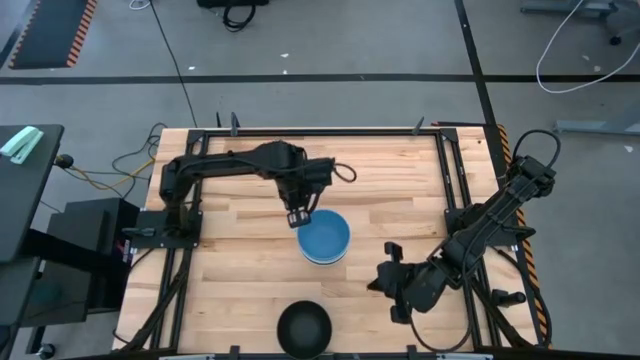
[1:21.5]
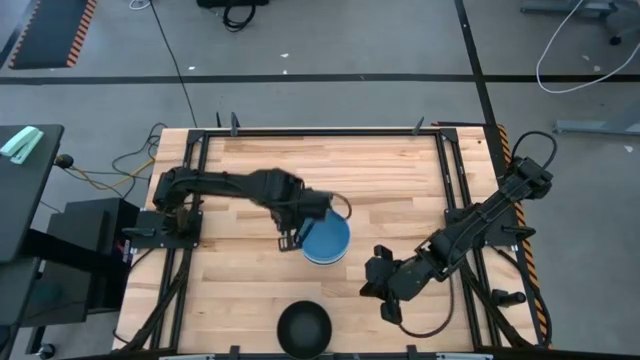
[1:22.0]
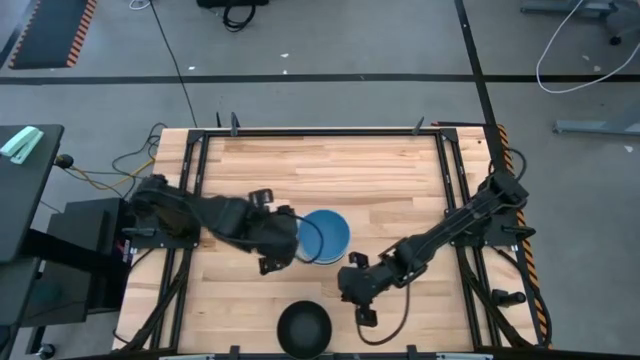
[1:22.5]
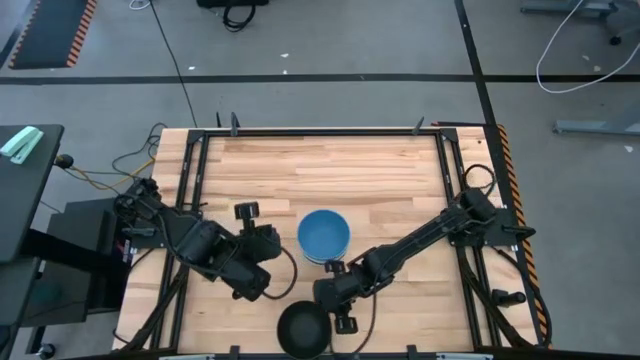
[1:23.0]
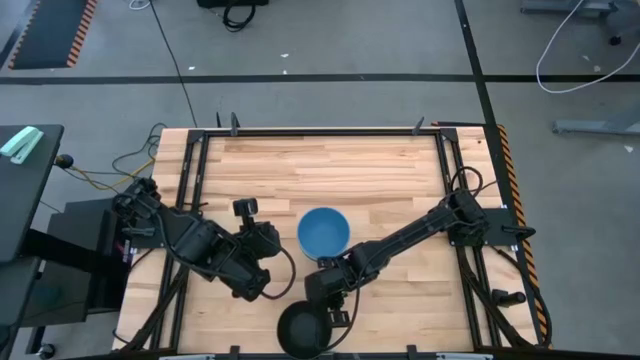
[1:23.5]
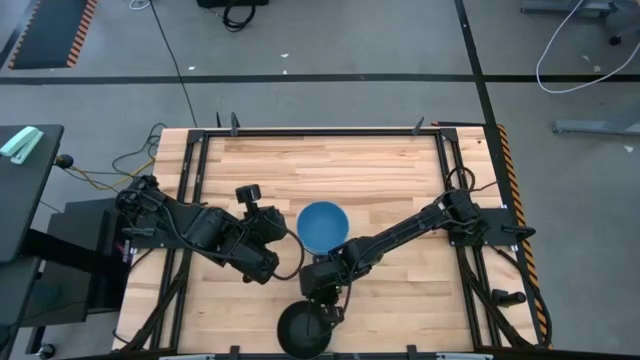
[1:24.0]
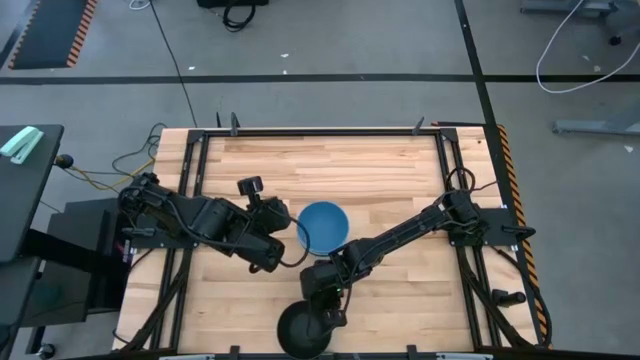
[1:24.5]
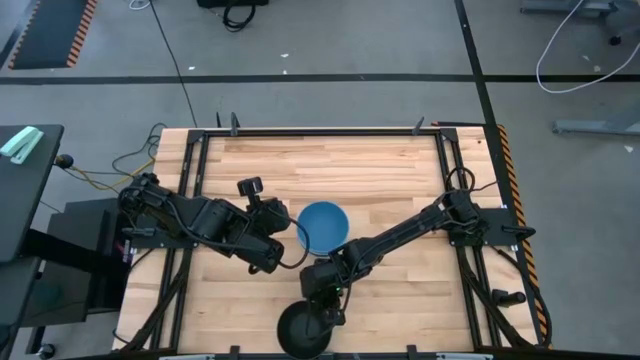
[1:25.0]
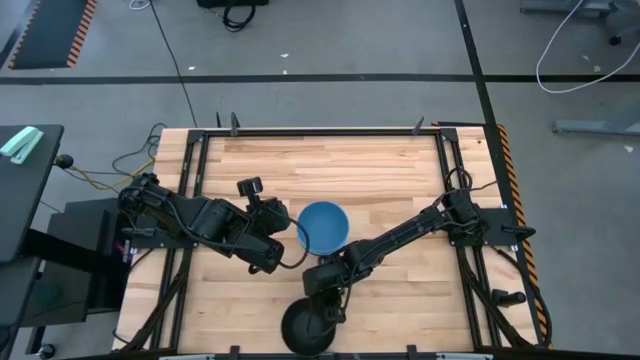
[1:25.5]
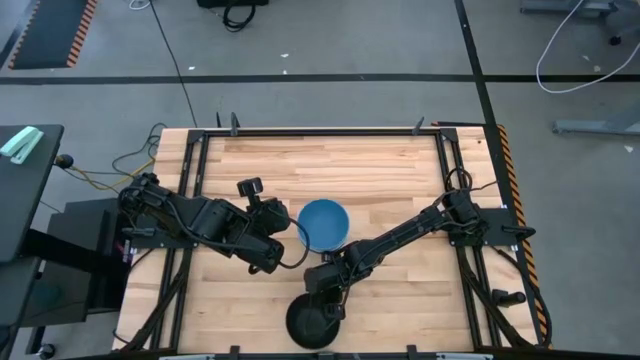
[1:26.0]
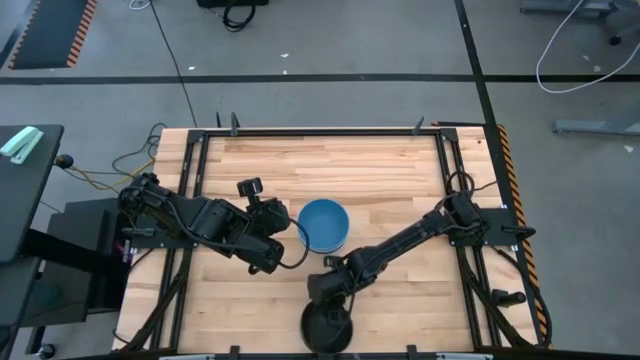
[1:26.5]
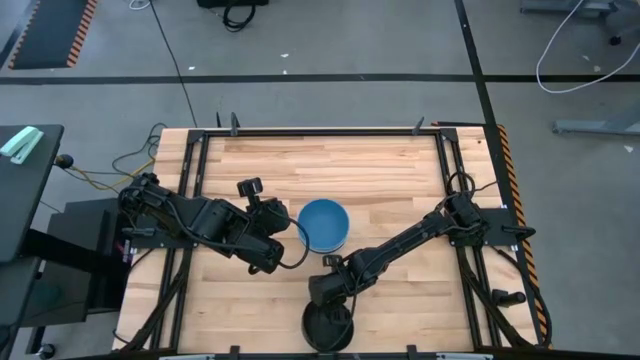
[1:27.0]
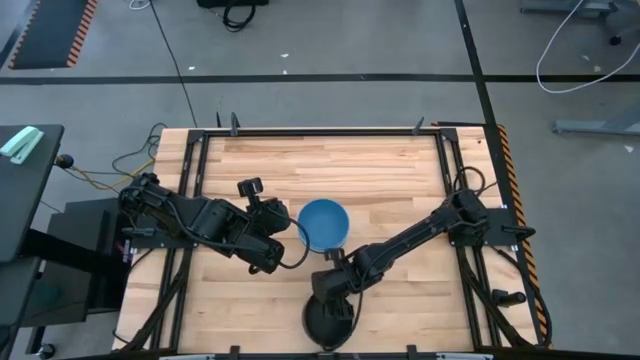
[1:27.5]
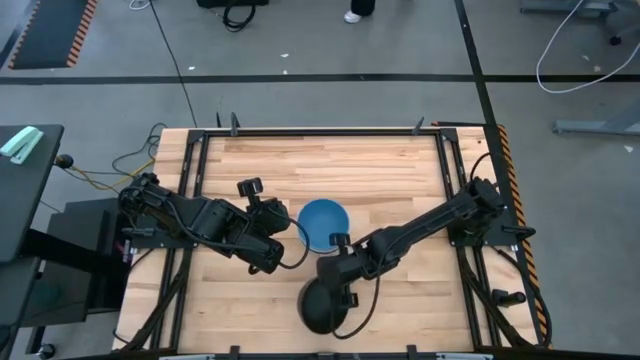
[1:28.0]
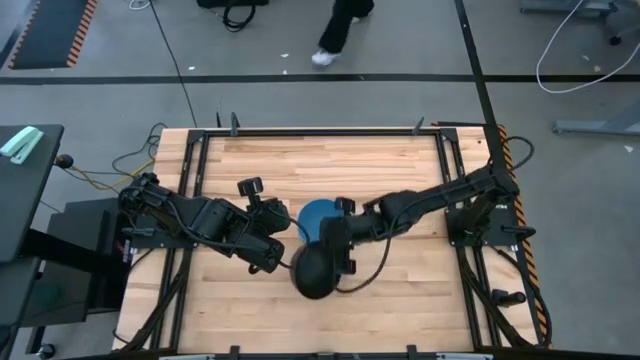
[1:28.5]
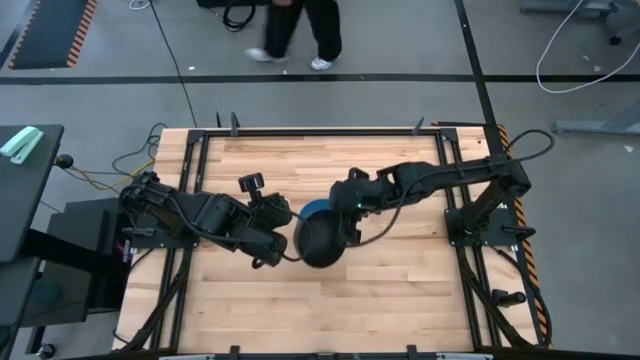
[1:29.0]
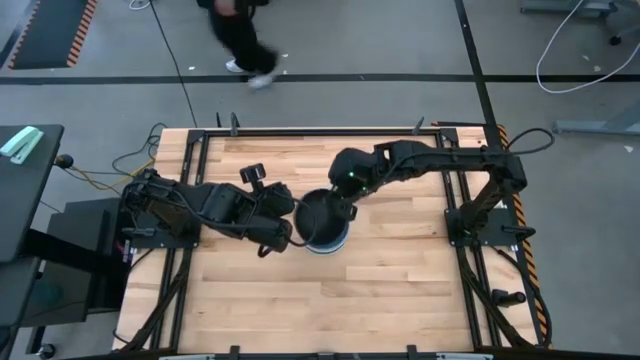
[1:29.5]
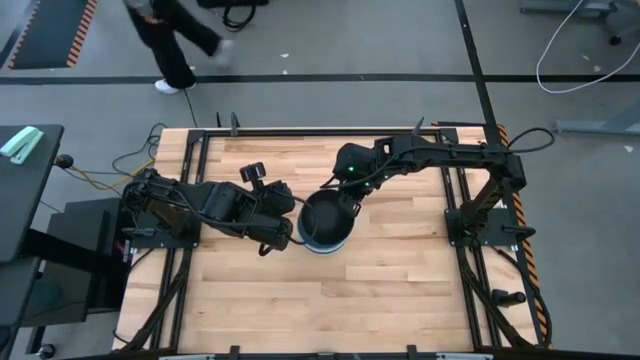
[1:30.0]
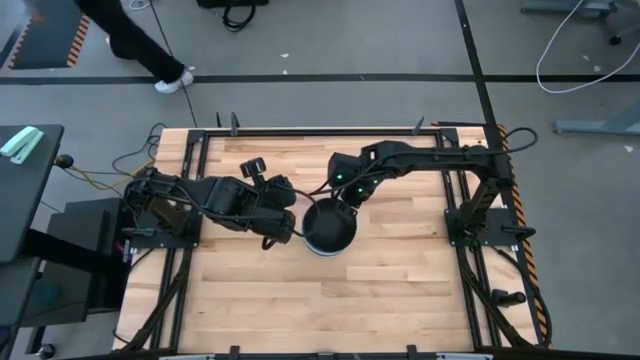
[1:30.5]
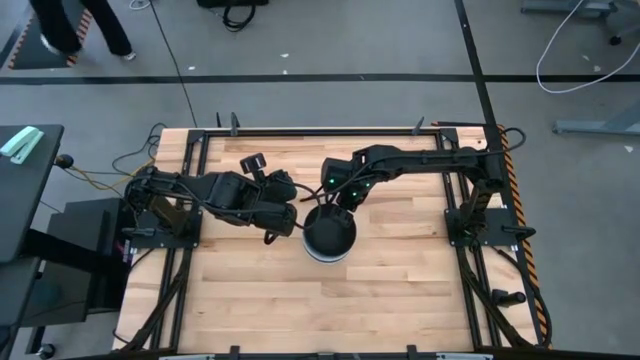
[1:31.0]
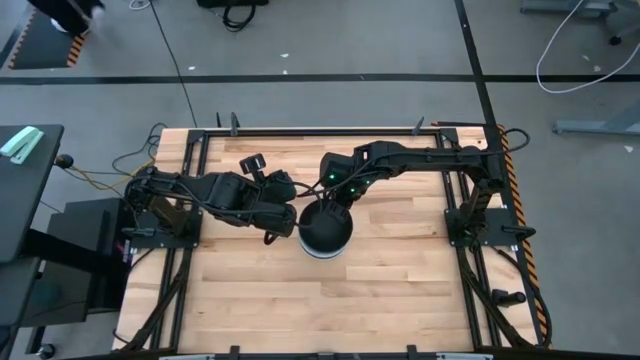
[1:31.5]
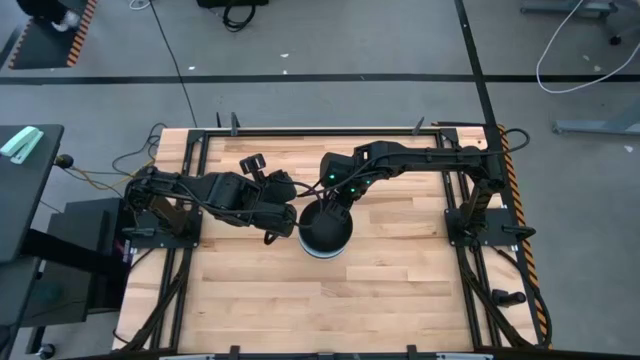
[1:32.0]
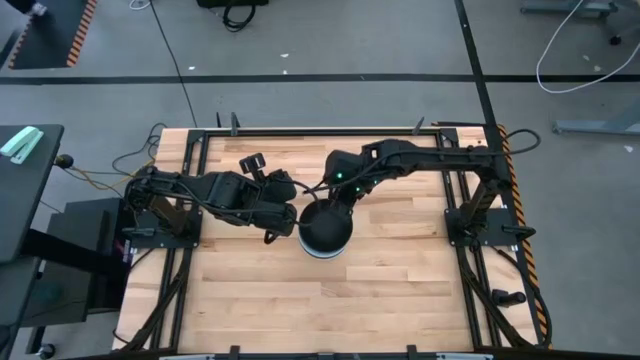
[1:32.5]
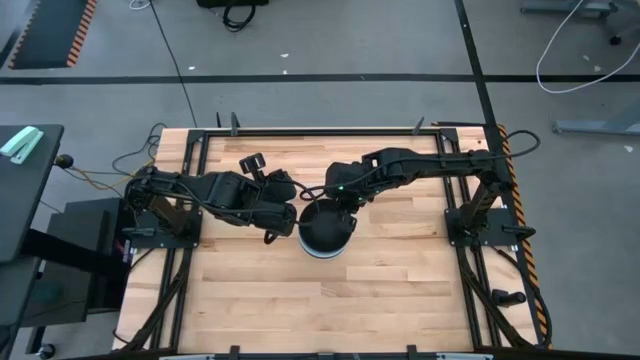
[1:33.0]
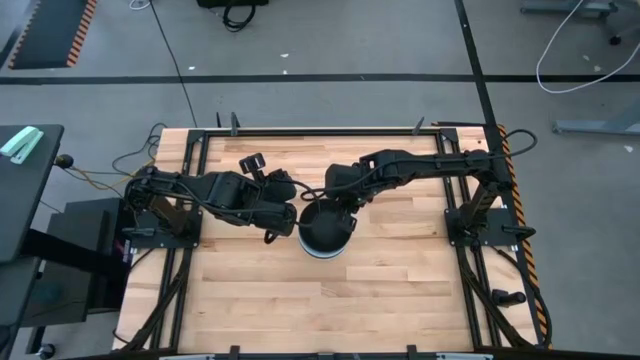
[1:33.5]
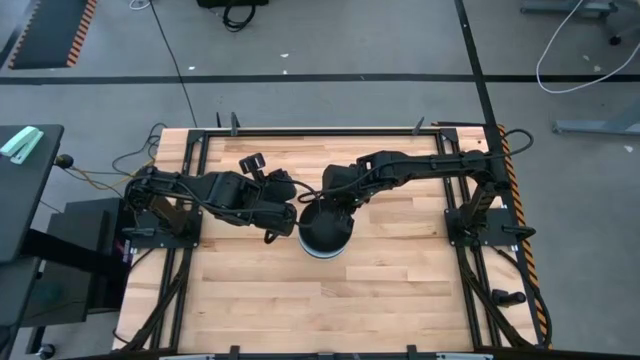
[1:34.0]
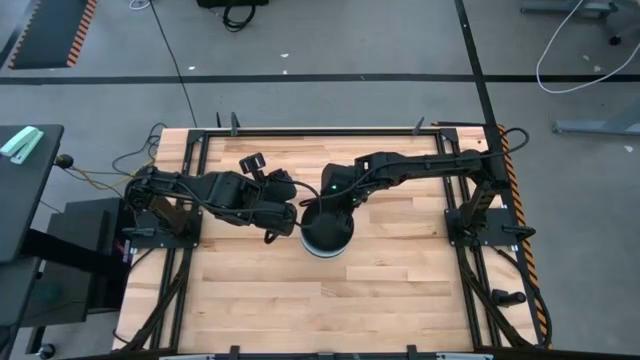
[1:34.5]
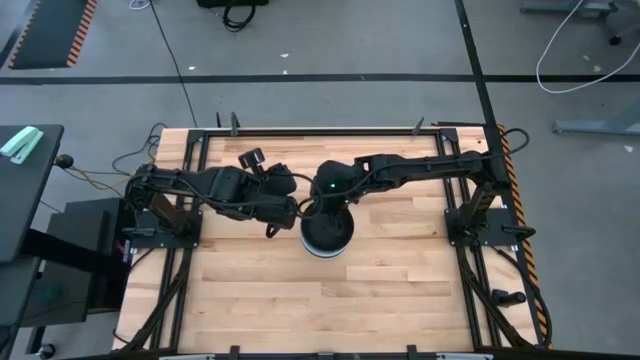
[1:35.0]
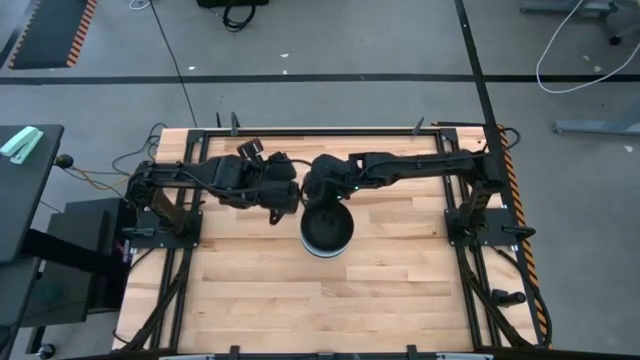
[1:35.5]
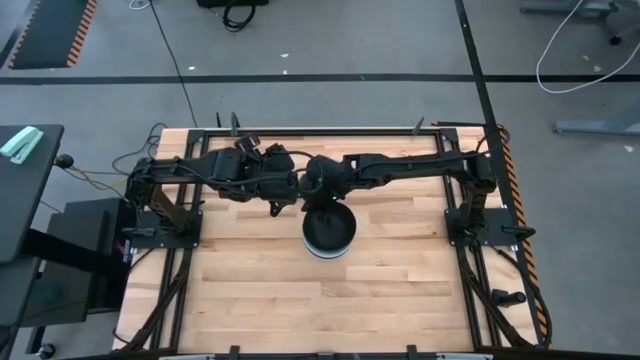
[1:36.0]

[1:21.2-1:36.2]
Task: Nest bowls inside each other
Stack the black bowl on top of the blue bowl

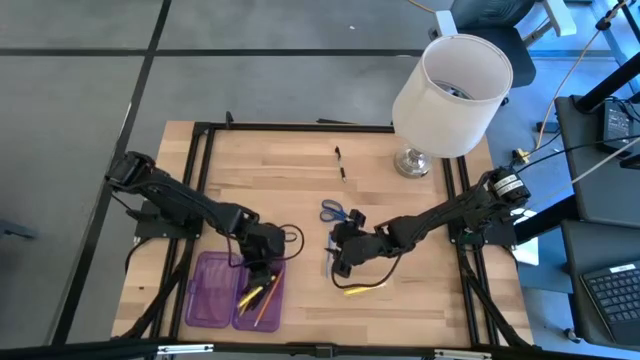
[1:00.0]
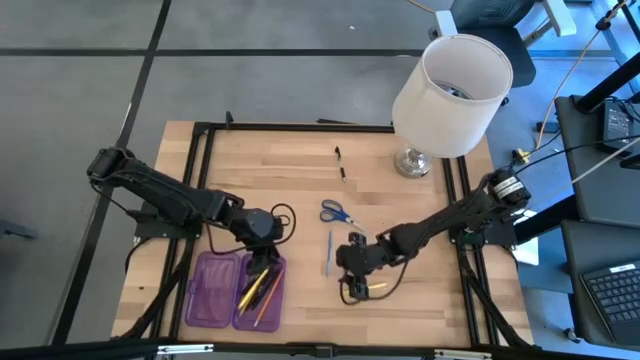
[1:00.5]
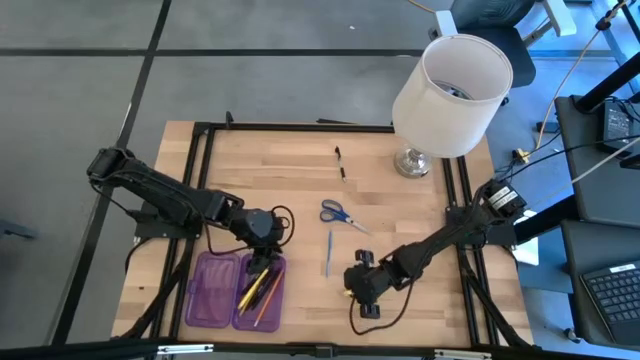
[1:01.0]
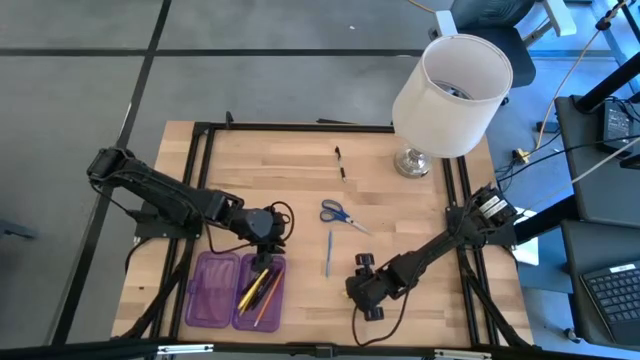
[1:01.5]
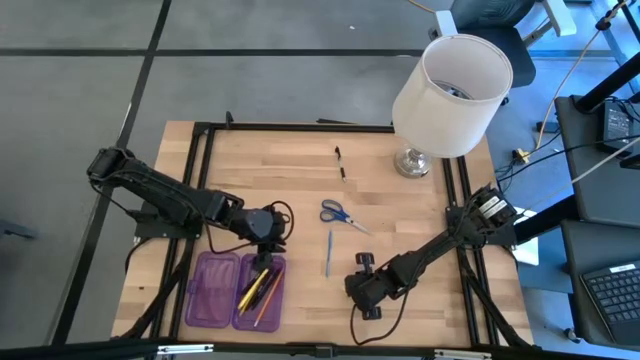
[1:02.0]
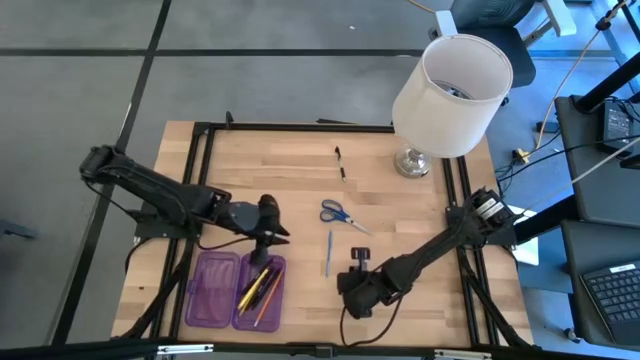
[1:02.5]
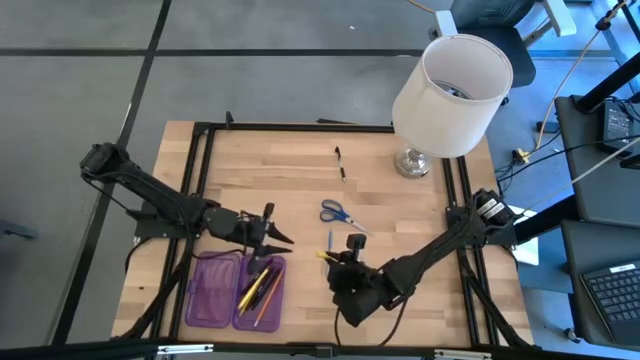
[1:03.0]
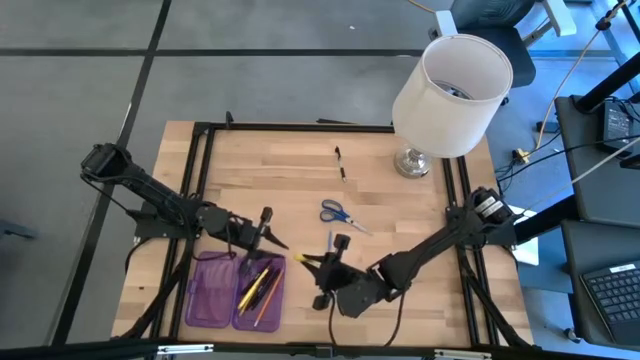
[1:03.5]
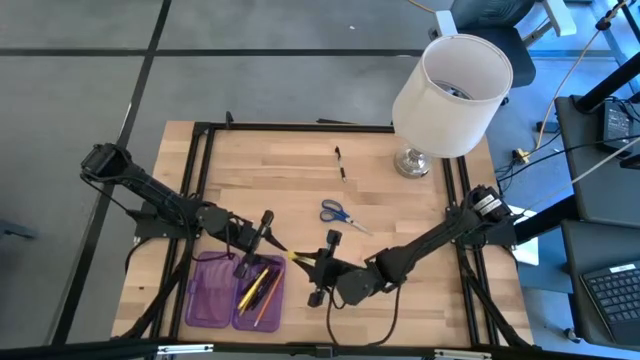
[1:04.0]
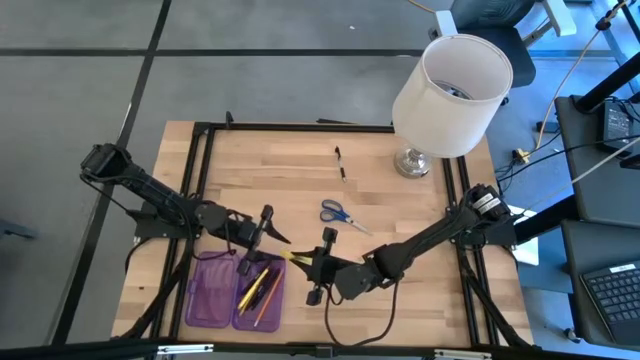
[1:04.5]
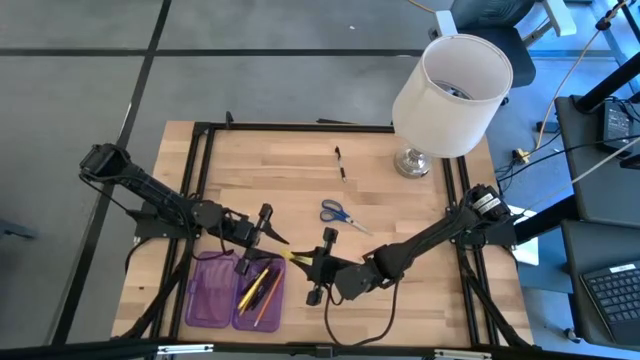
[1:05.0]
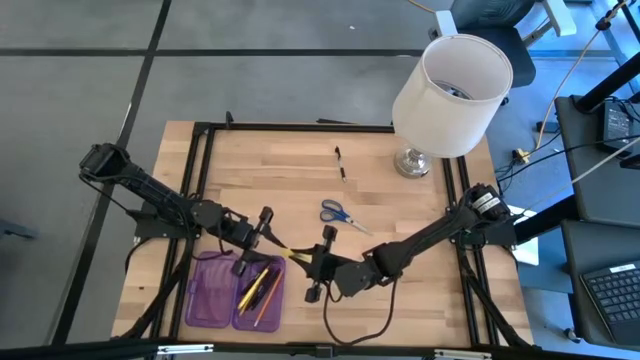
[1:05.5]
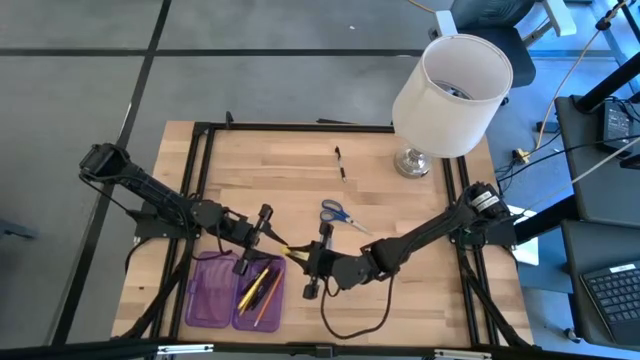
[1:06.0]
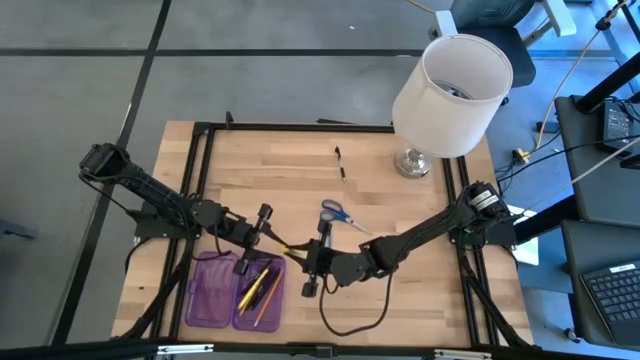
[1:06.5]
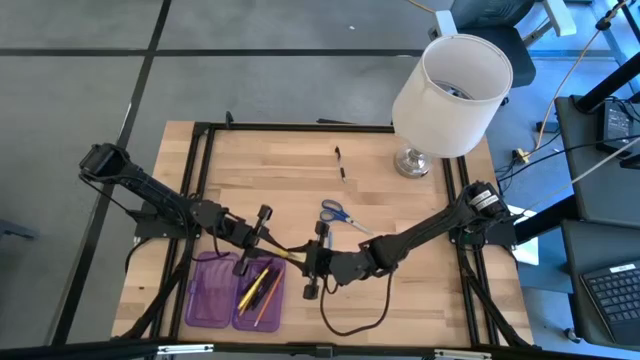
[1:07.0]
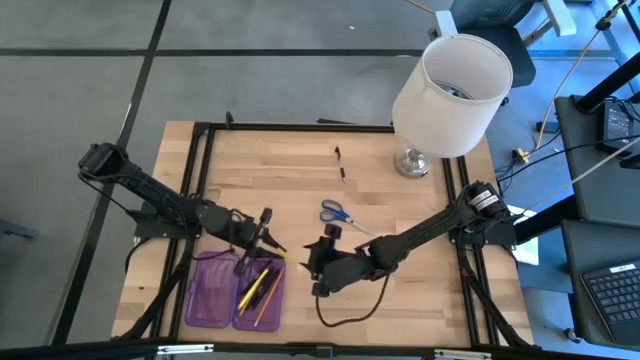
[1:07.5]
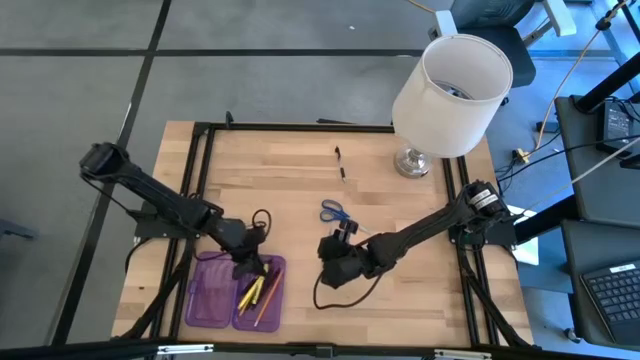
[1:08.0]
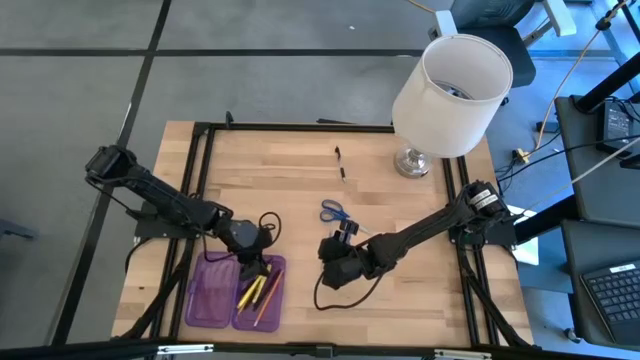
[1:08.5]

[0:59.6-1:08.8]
Task: Pick & place school supplies into a supply box
Put the yellow pen into the violet box
